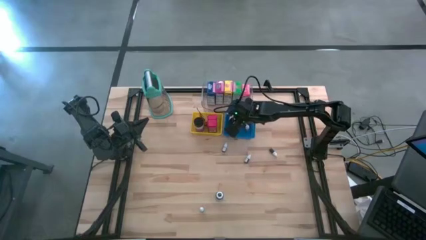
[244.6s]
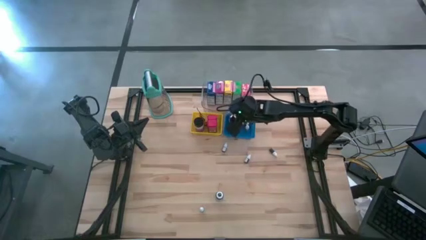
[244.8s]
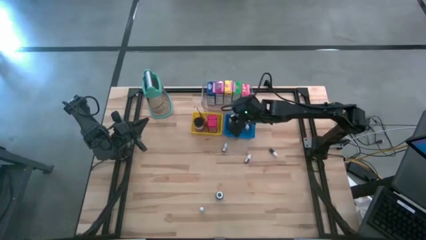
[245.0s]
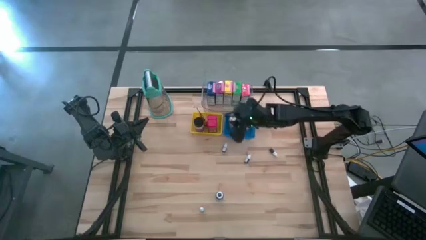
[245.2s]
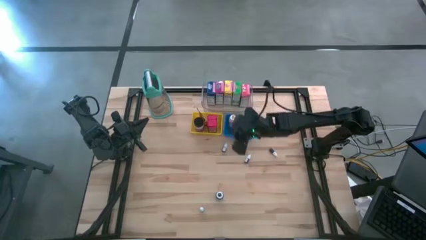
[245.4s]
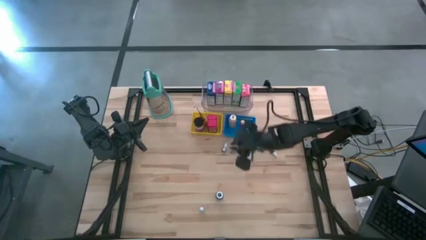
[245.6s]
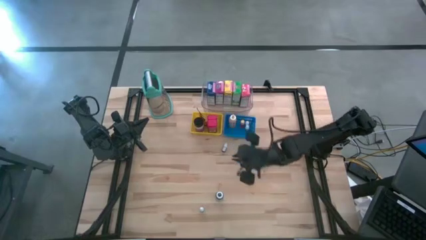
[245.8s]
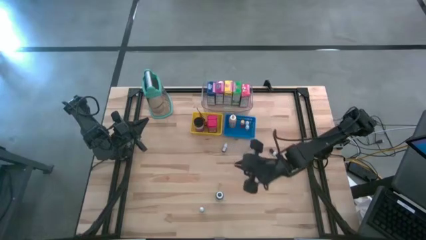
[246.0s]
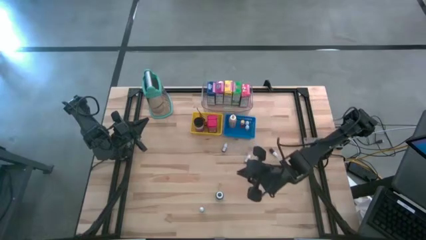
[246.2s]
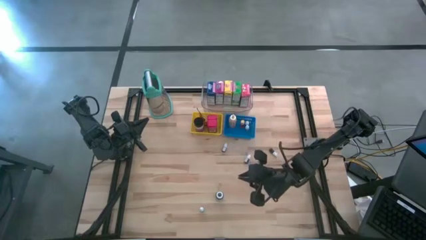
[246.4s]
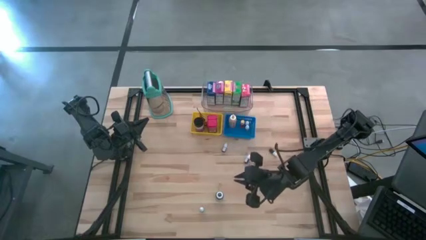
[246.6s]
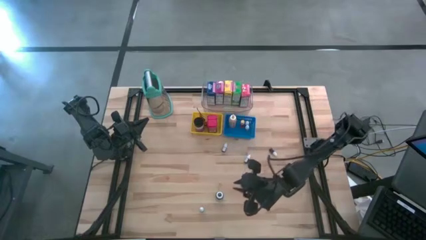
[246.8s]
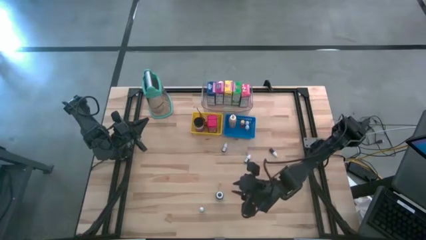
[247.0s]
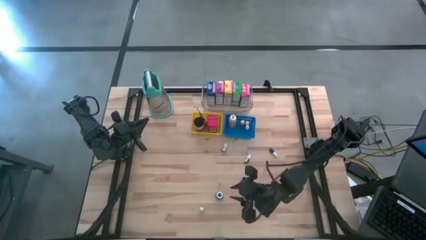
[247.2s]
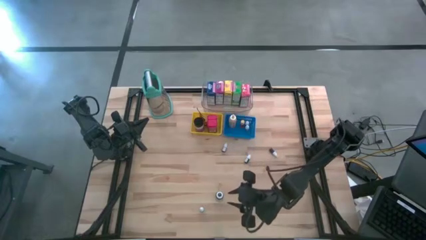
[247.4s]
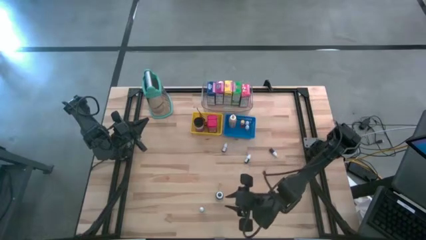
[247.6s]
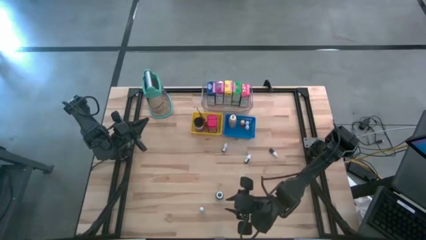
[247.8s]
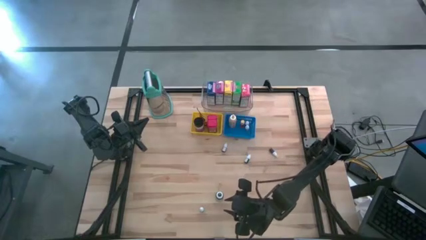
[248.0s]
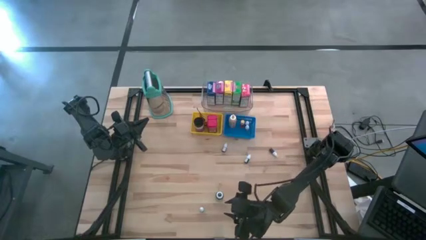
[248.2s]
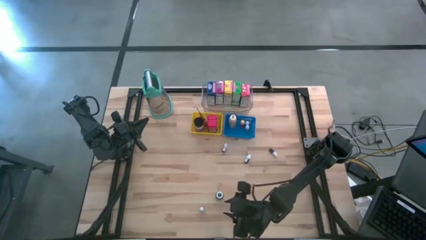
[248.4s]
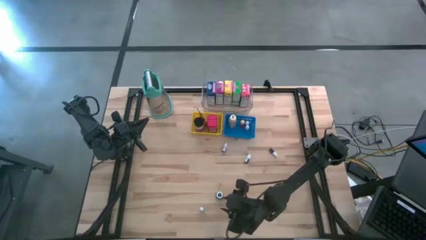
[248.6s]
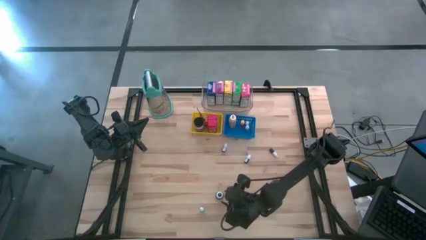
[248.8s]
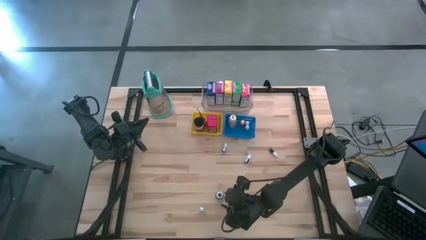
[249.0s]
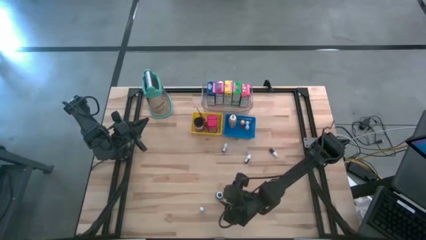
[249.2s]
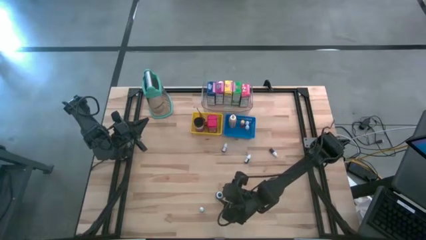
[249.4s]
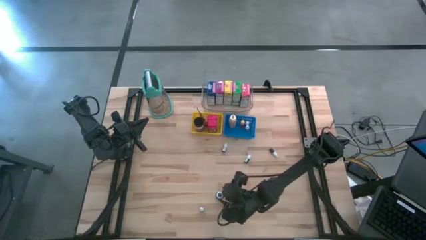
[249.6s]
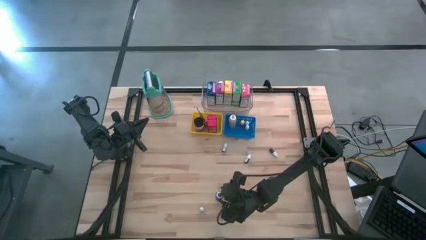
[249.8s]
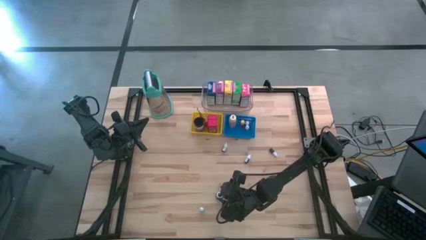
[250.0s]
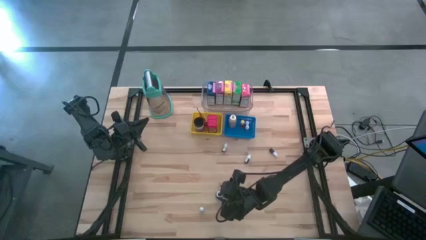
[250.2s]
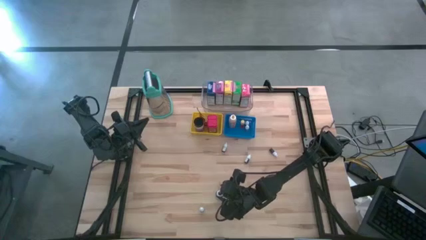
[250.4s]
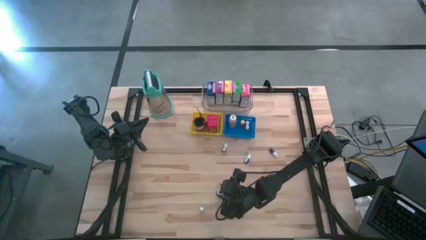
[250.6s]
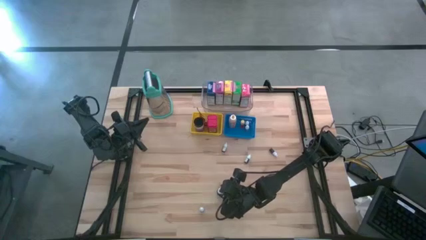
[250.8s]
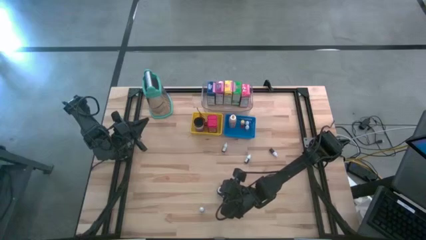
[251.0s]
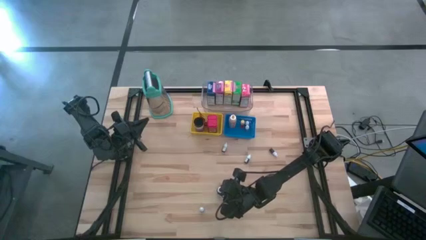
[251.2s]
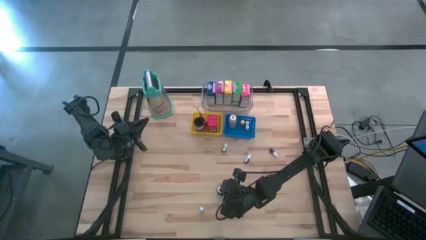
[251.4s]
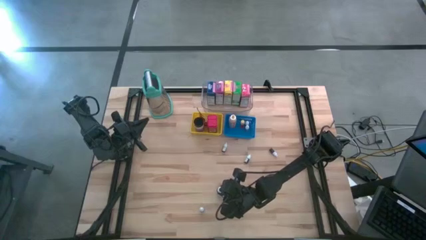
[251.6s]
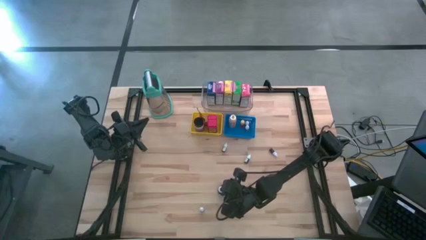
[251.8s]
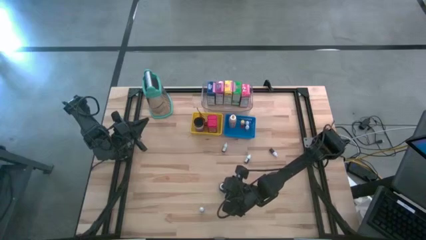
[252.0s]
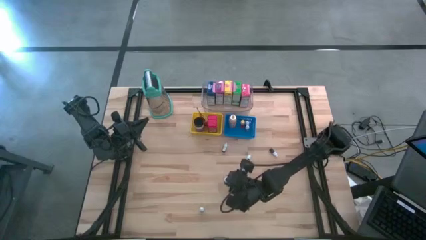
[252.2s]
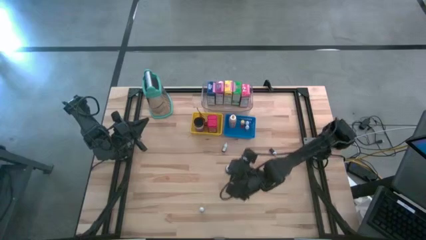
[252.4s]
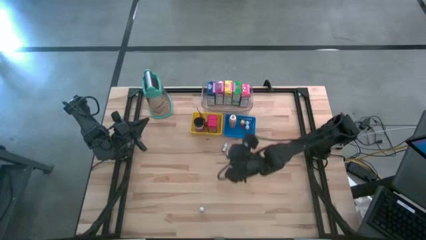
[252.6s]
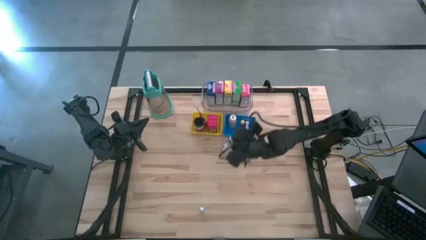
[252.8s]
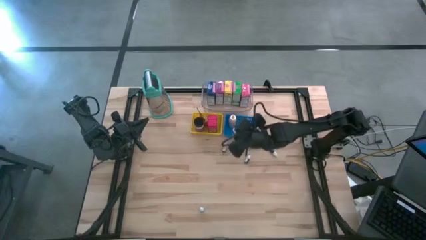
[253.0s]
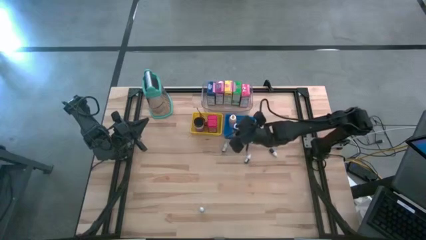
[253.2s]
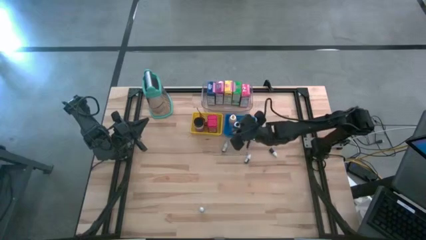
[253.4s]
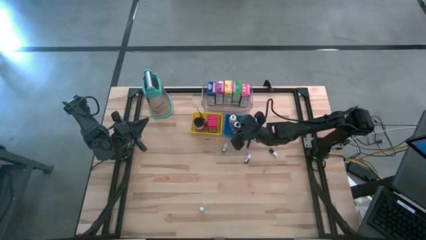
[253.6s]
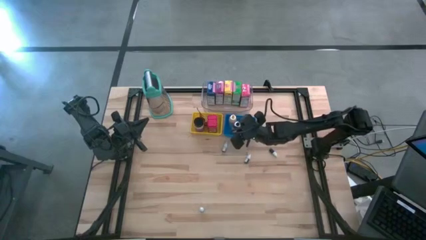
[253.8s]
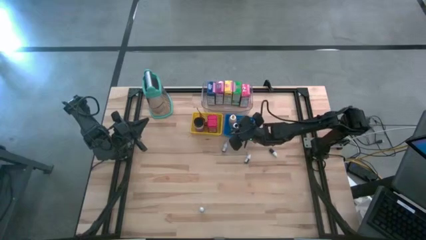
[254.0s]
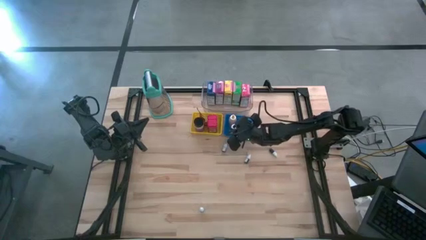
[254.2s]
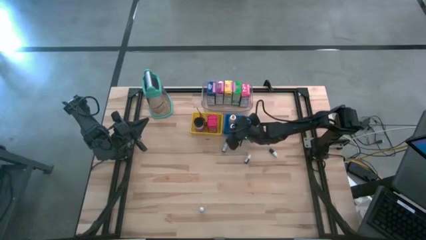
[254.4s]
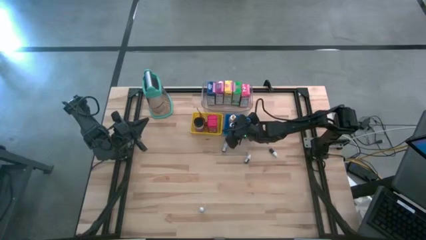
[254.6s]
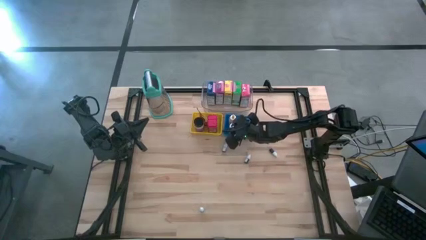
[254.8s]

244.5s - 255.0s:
Task: Pick & Place Kitchen Items
Put the large black food coloring bottle into the blue bin

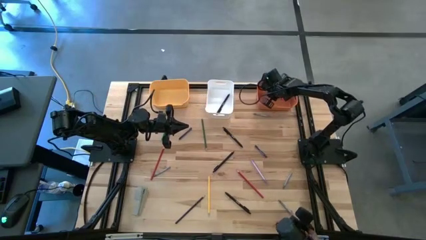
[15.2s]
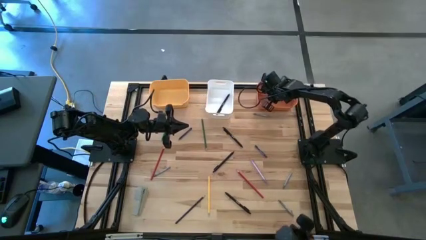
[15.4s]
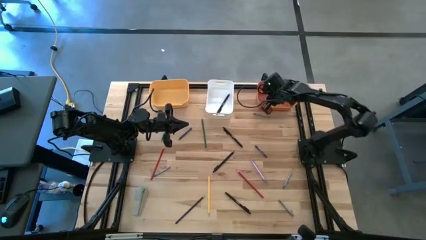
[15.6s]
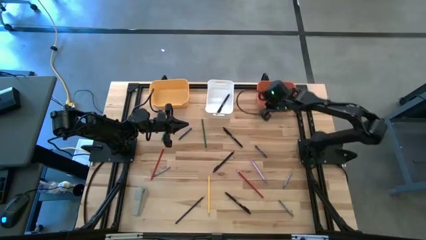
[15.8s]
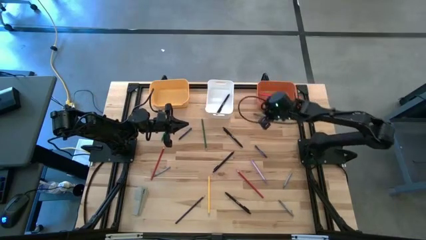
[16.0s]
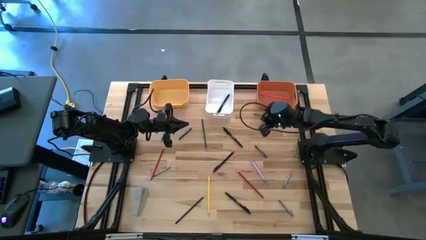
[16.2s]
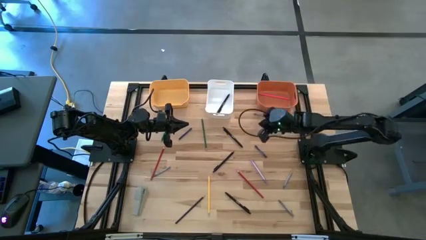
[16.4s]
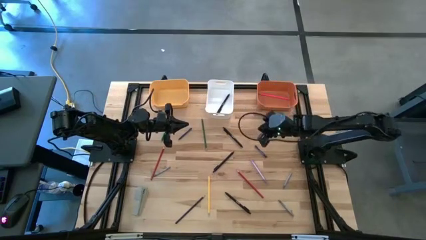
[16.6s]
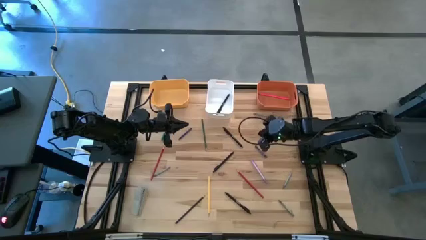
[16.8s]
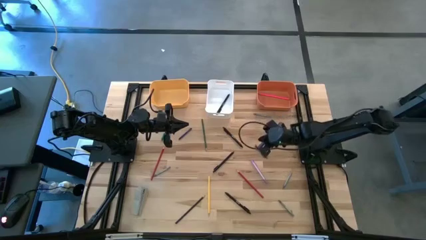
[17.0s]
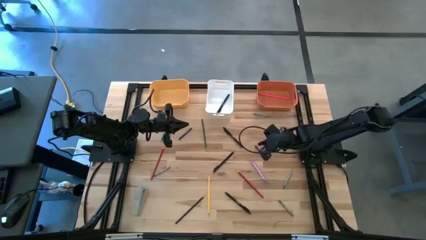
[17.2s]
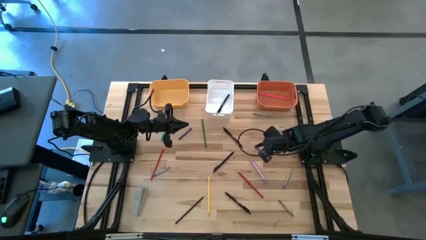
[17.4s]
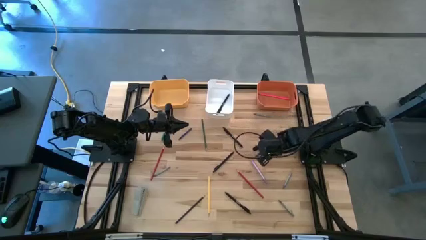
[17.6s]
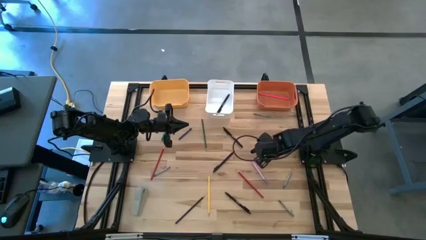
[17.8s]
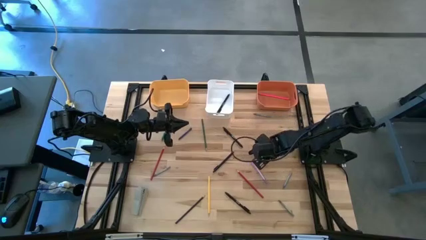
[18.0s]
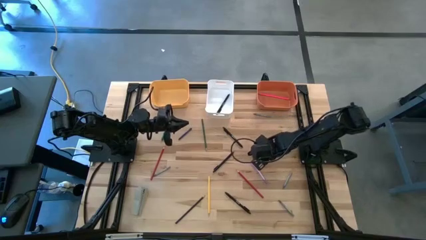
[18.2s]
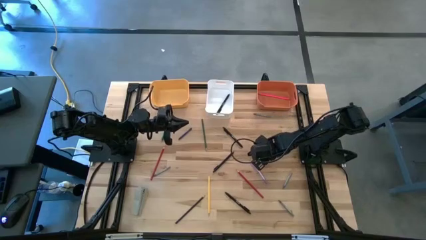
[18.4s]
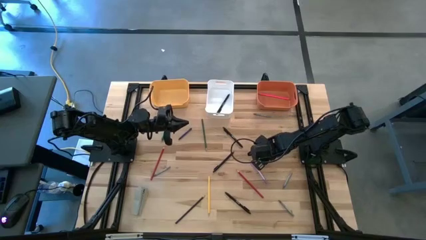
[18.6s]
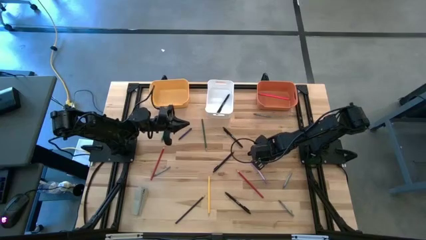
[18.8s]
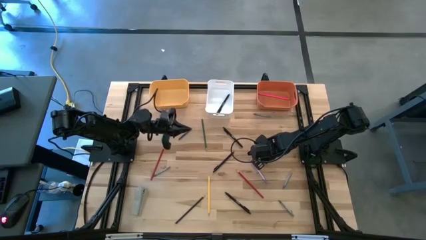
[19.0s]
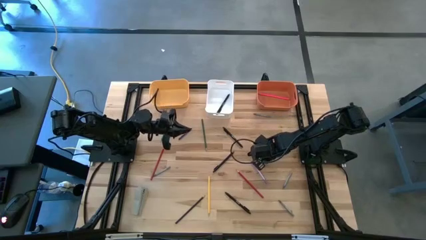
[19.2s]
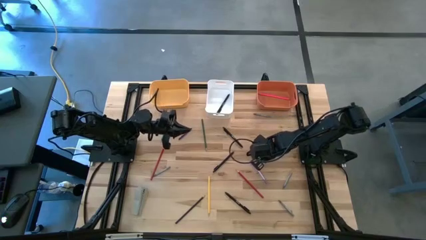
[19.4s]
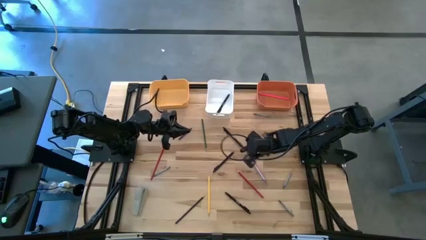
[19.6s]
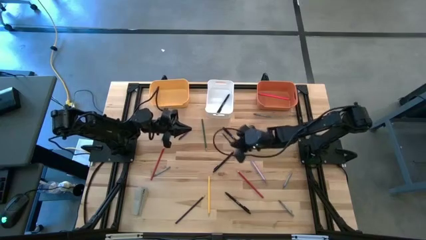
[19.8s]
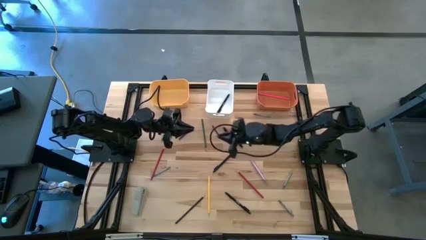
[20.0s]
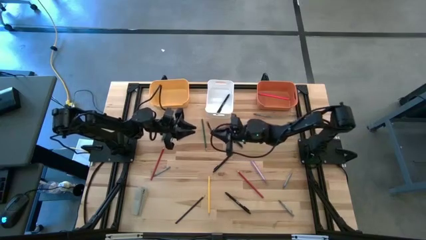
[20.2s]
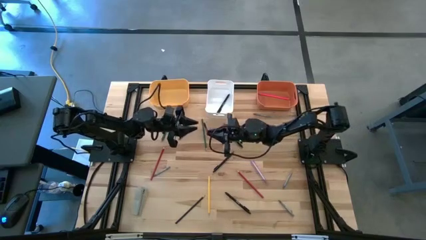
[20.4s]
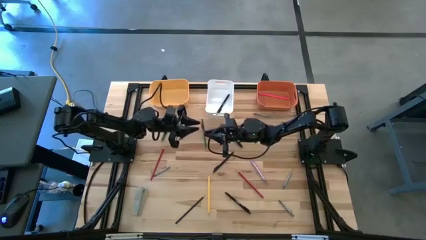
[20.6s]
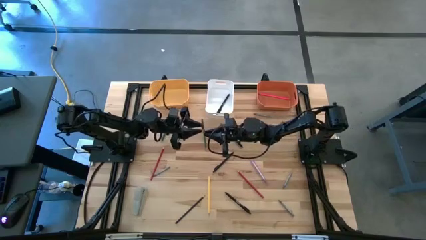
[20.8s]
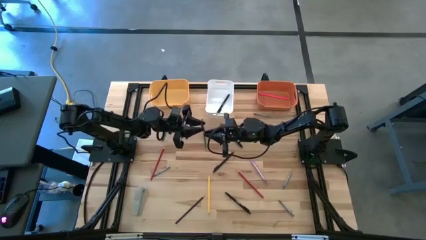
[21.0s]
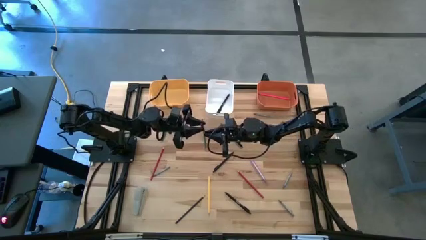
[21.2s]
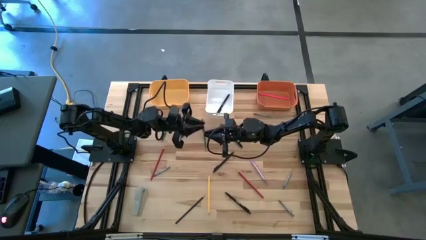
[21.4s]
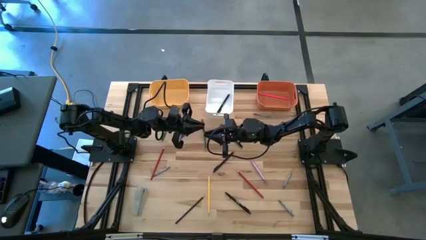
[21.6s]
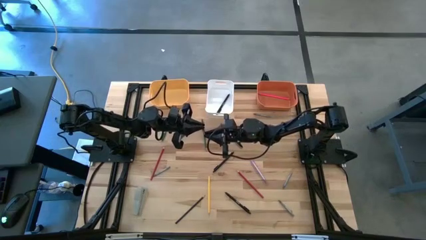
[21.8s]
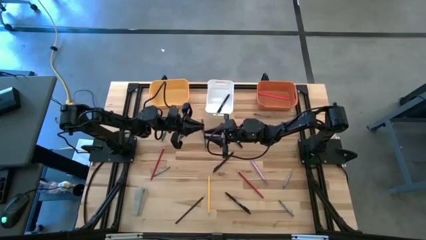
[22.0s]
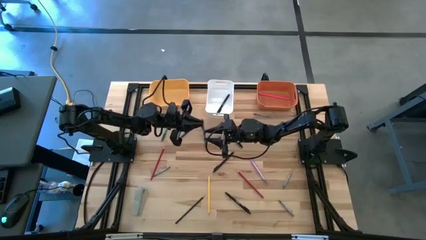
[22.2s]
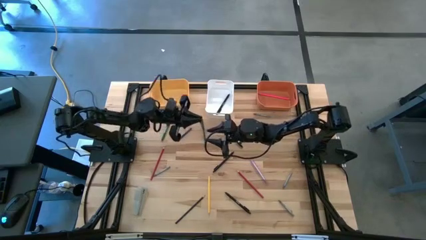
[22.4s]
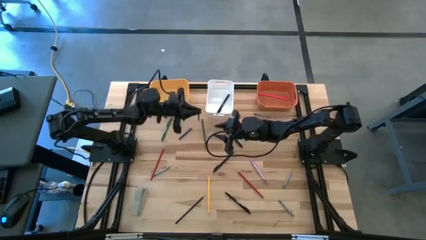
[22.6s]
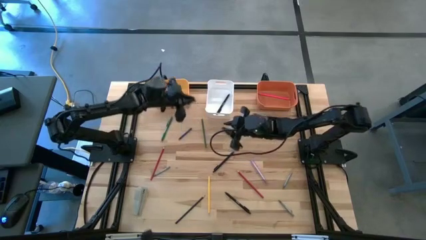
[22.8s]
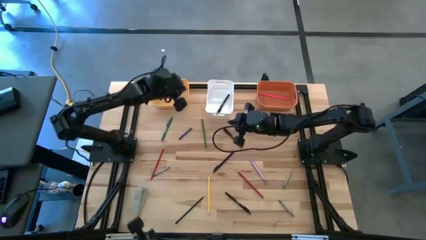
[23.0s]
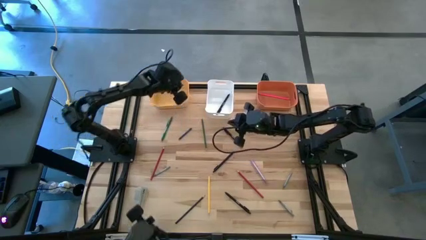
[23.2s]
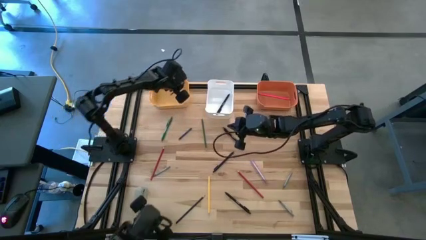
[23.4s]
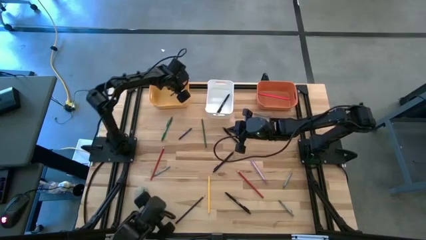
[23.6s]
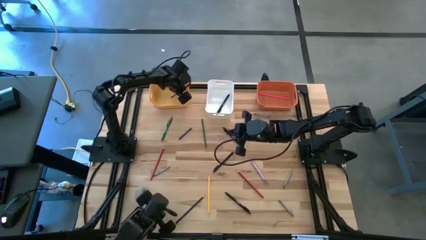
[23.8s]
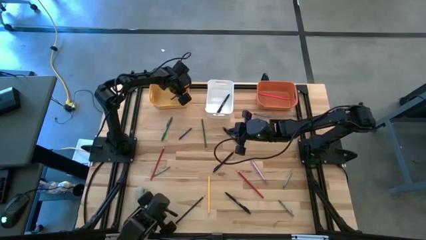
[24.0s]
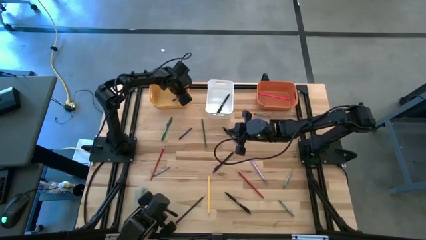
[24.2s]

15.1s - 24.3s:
Task: Sort crayons/erasers/pens/pencils in bins
Put the blue crayon into the yellow bin
